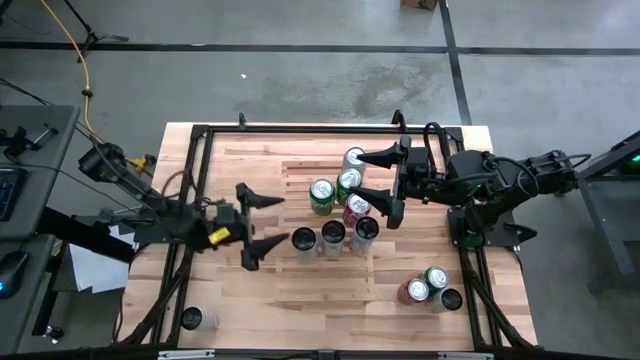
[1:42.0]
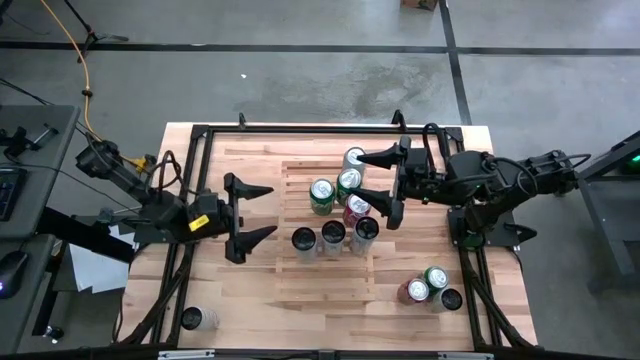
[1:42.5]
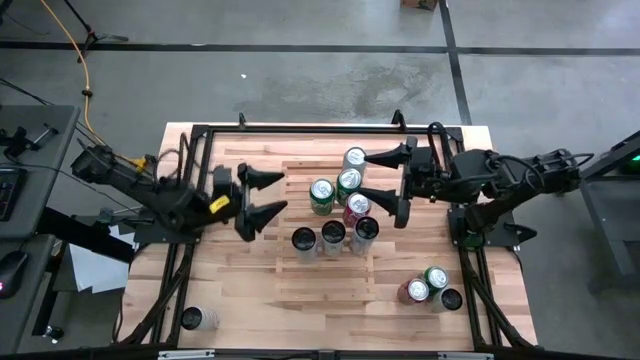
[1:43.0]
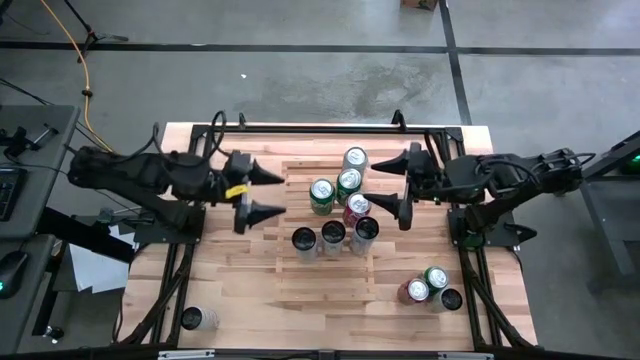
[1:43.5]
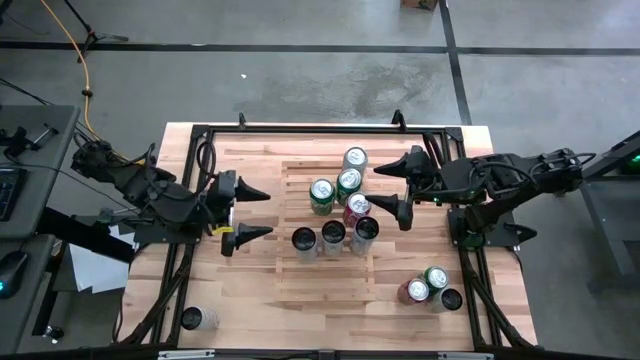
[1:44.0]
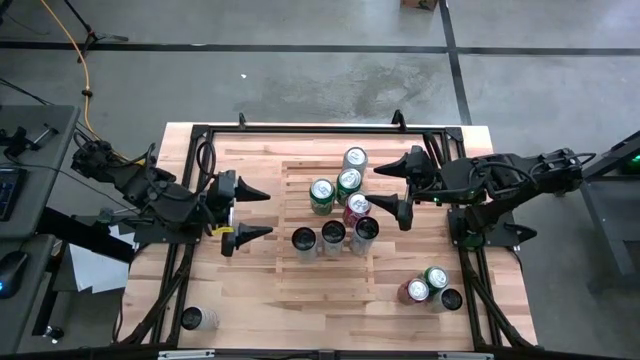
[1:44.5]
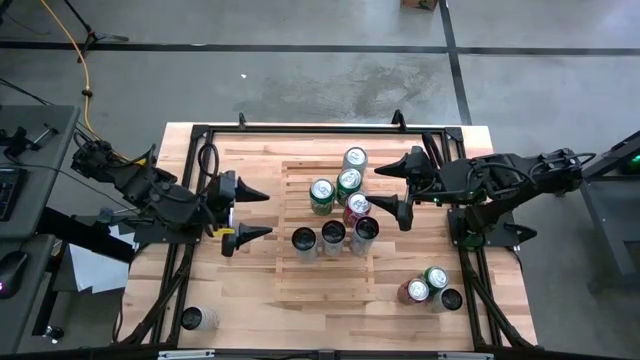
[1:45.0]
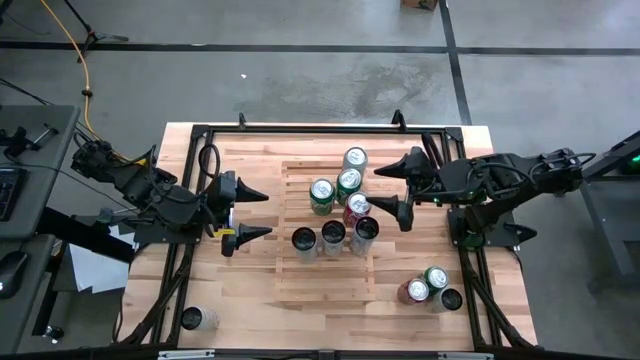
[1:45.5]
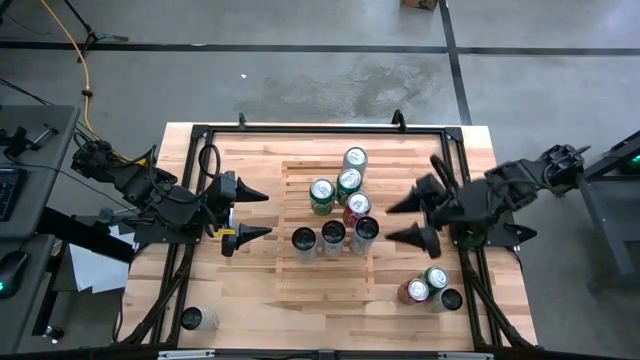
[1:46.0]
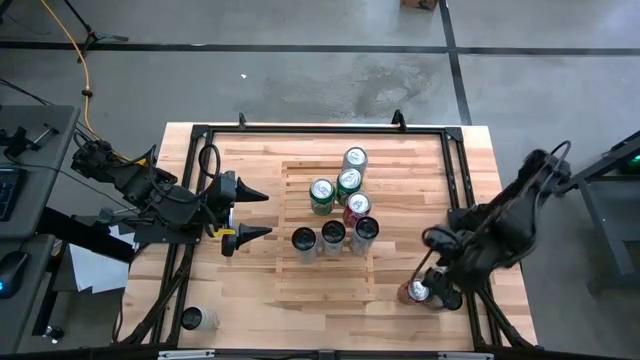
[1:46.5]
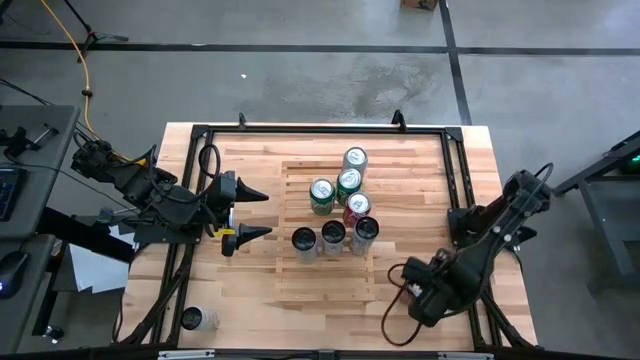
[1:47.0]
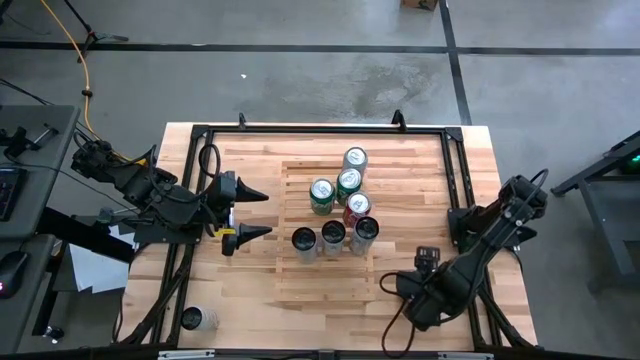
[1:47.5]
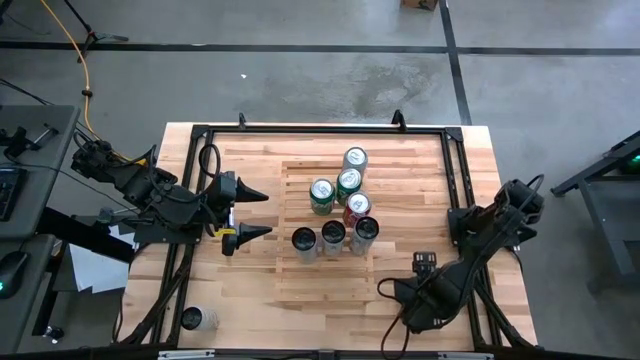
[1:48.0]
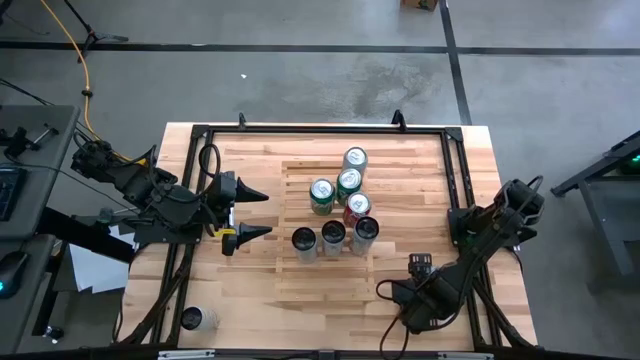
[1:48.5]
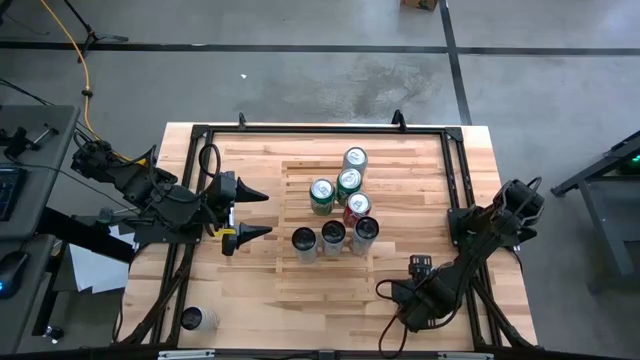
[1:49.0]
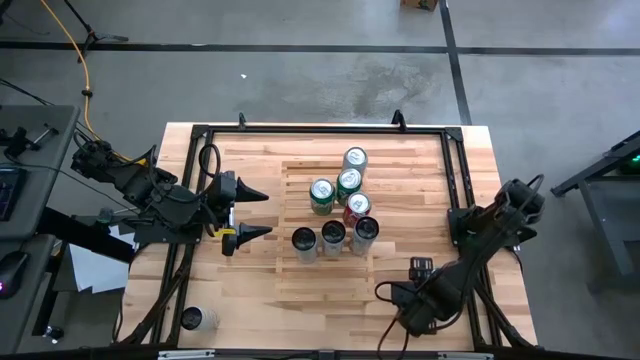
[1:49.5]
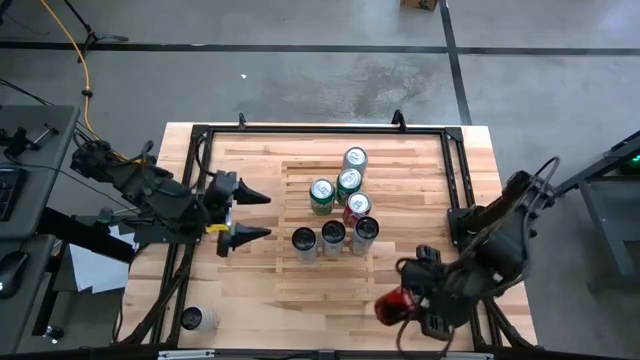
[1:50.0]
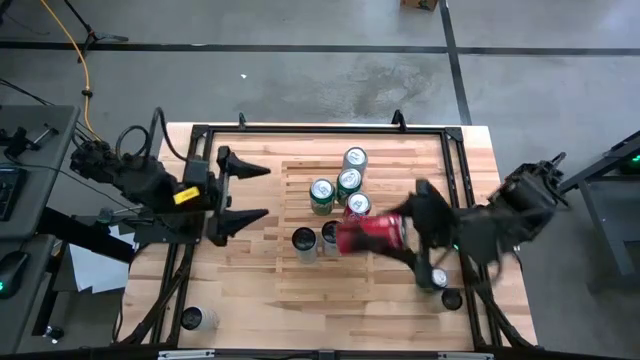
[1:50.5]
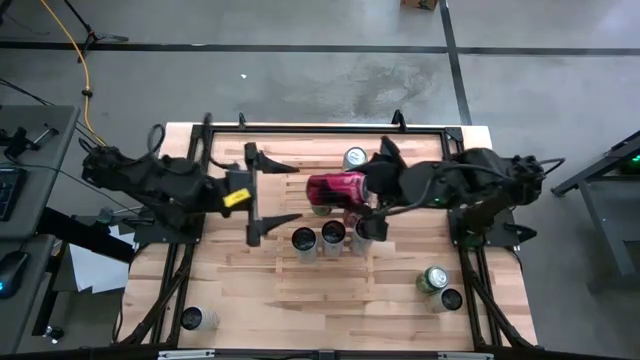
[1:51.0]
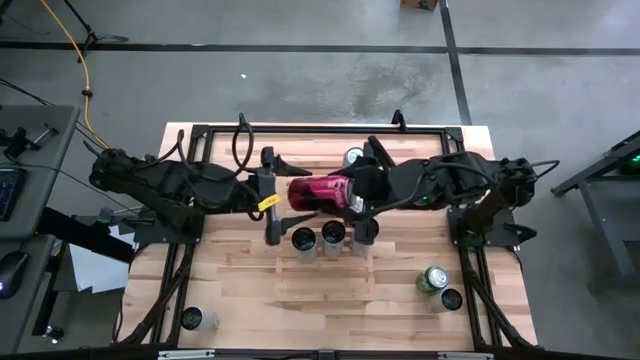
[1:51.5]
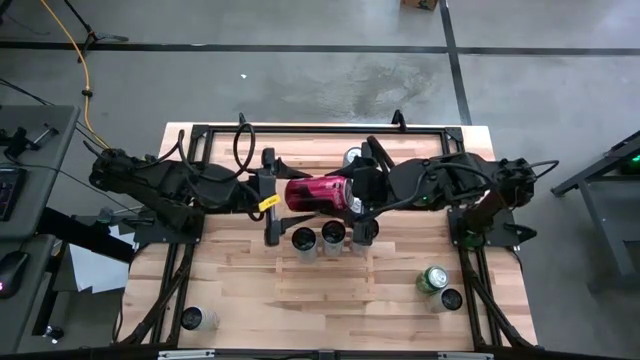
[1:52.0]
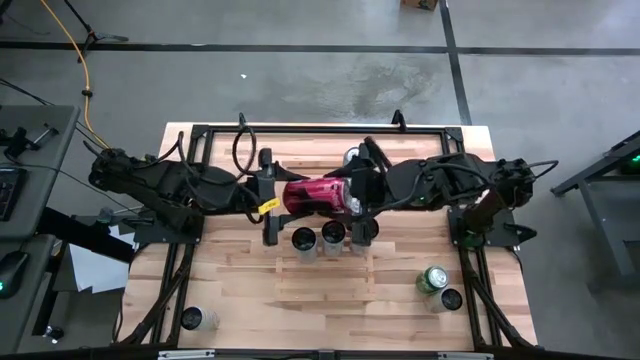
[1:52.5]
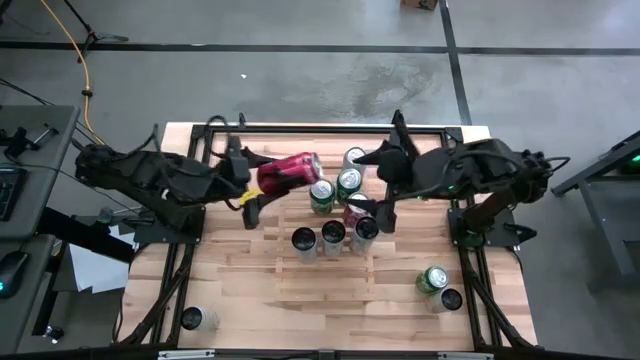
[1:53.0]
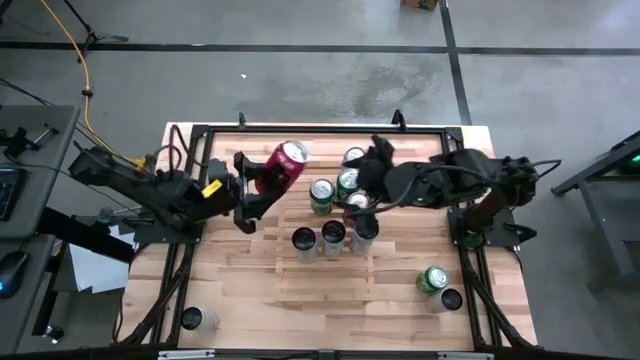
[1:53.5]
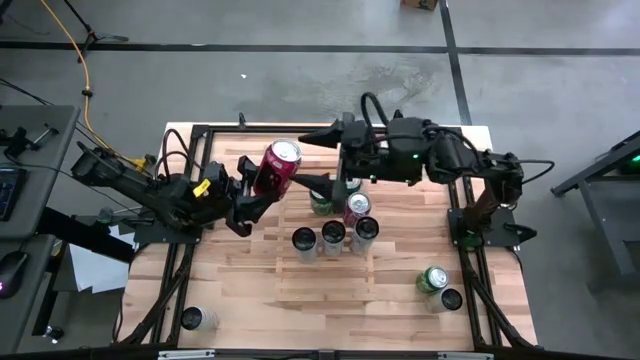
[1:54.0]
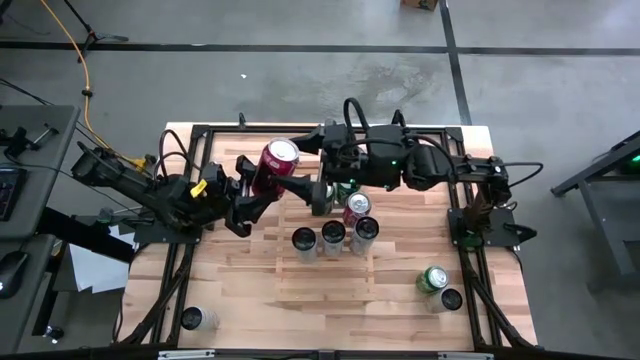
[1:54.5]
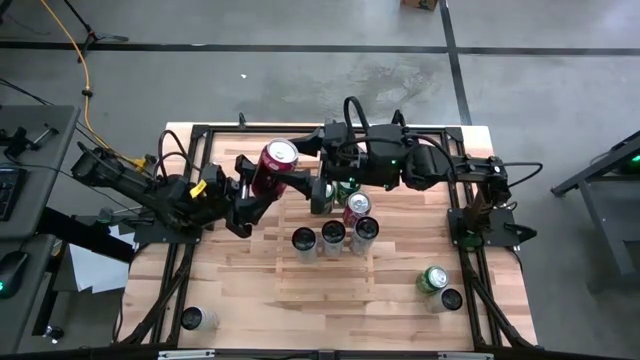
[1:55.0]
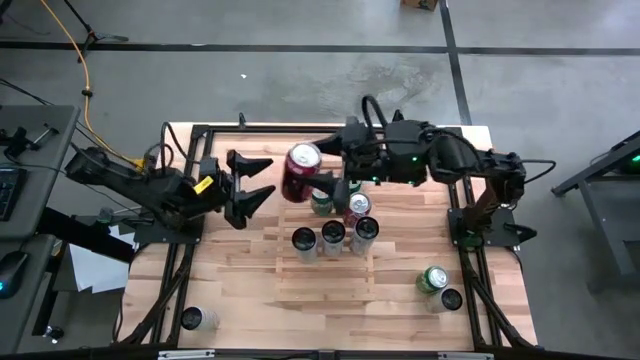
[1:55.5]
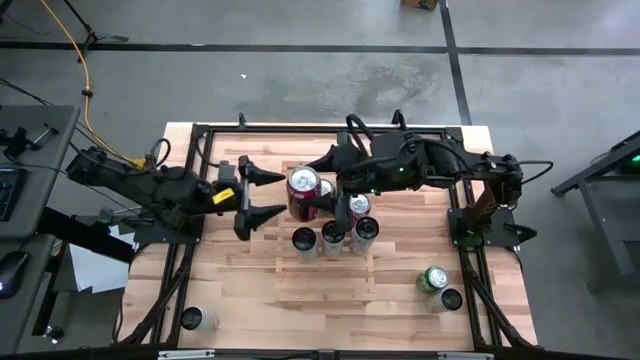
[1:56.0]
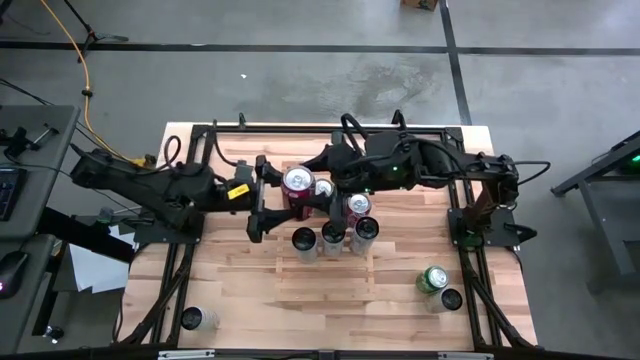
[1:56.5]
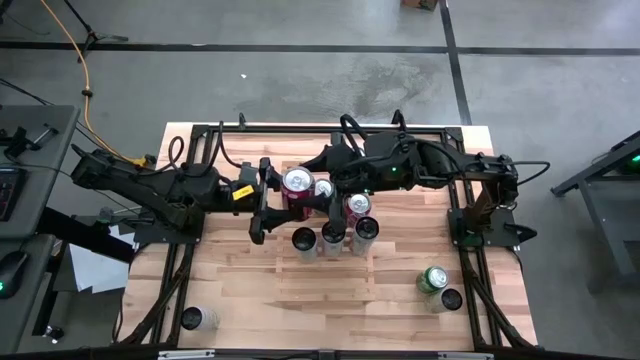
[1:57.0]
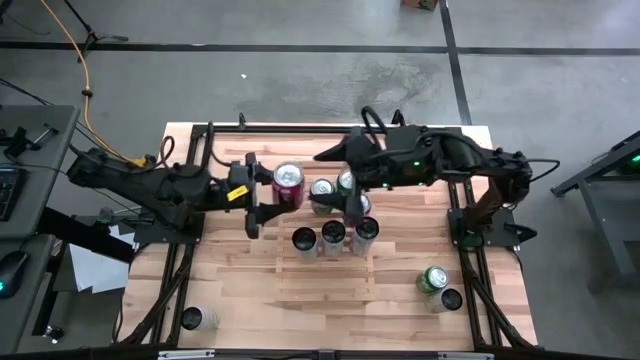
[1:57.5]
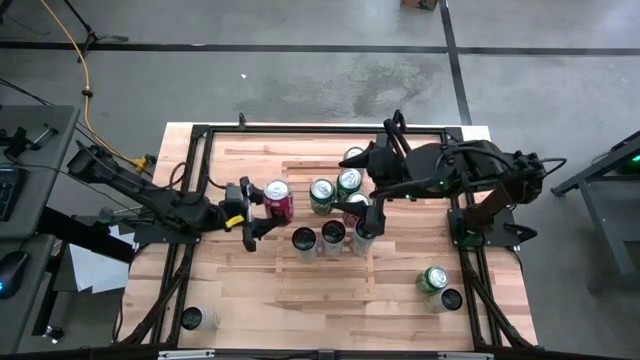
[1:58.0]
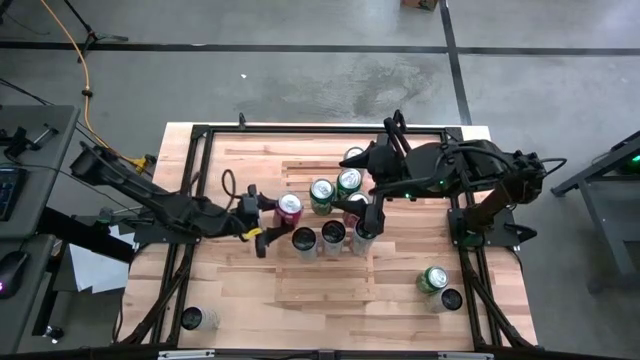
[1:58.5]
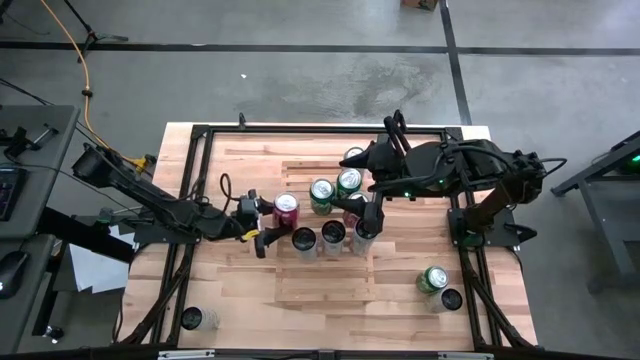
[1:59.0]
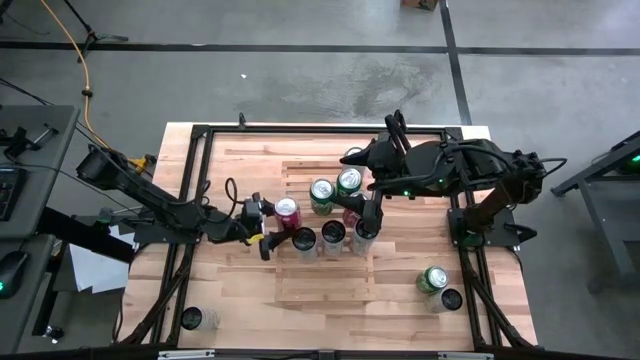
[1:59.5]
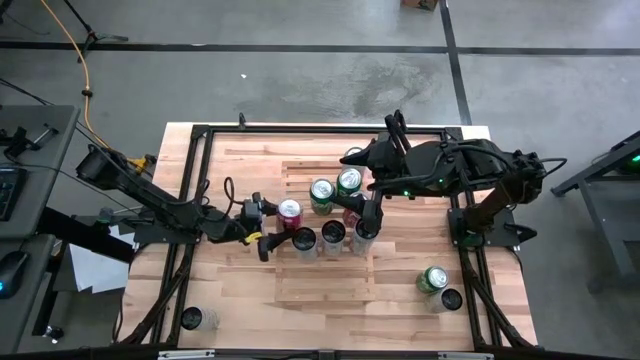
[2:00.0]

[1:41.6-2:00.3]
Task: Place canned beverage on shelf
Put the red soda can on the shelf aligned with the other red soda can

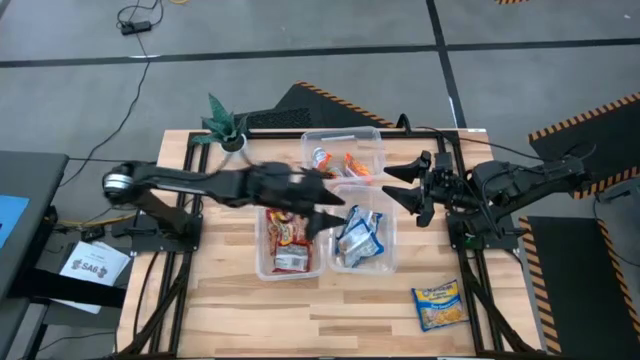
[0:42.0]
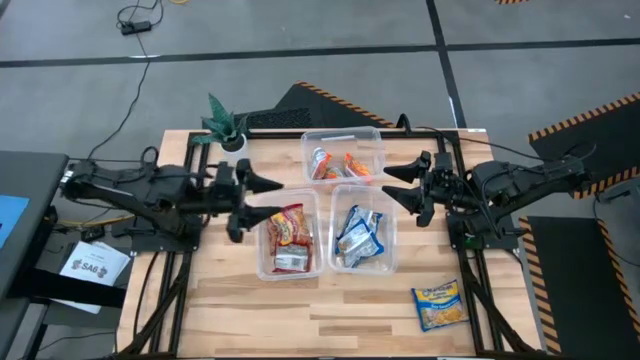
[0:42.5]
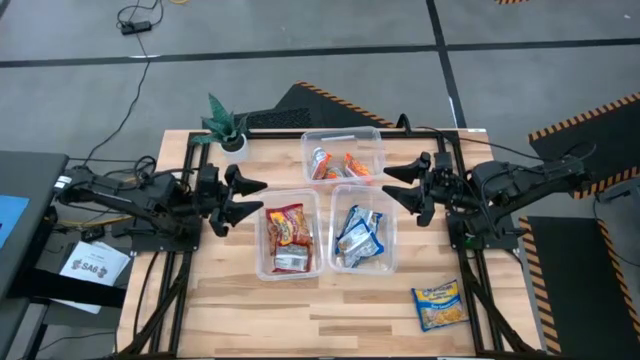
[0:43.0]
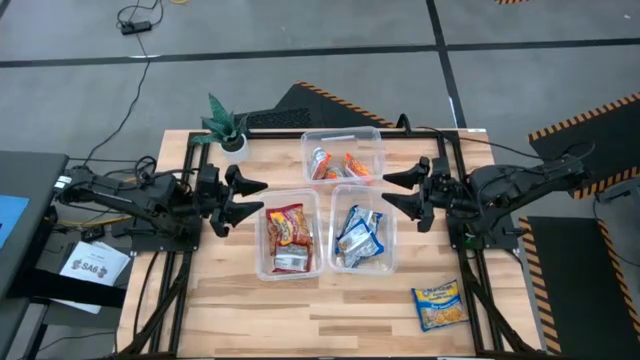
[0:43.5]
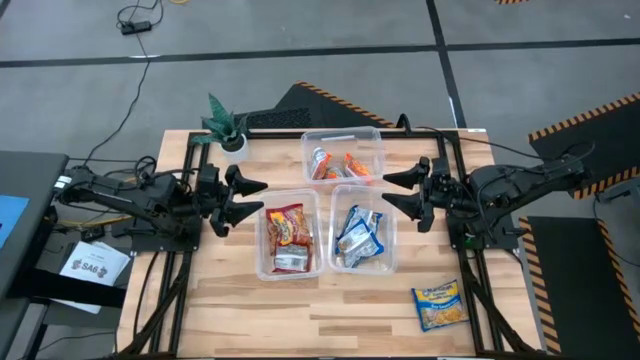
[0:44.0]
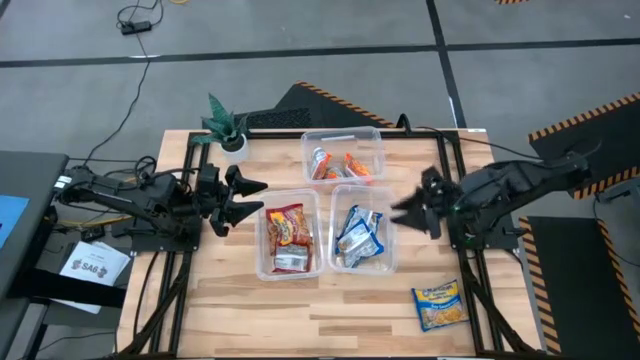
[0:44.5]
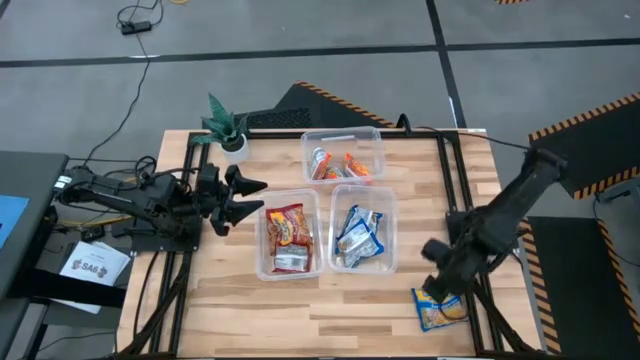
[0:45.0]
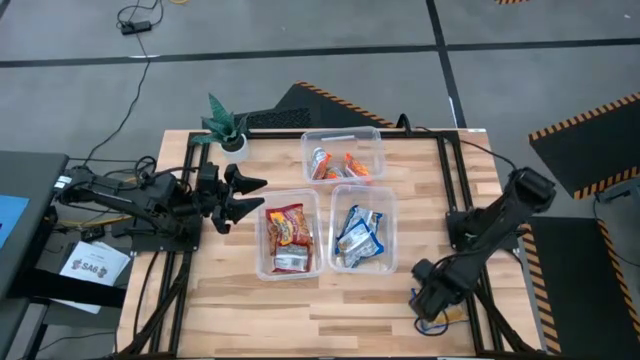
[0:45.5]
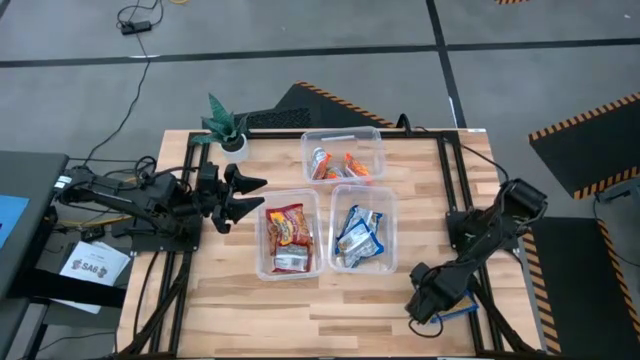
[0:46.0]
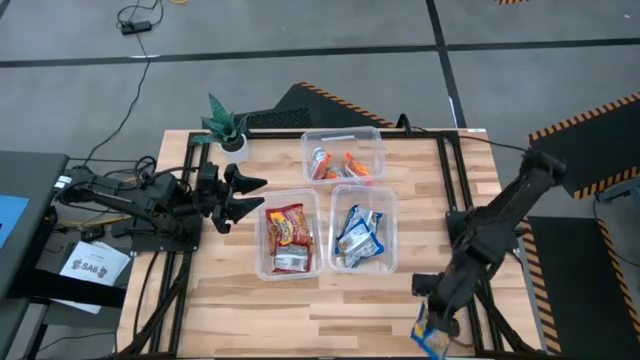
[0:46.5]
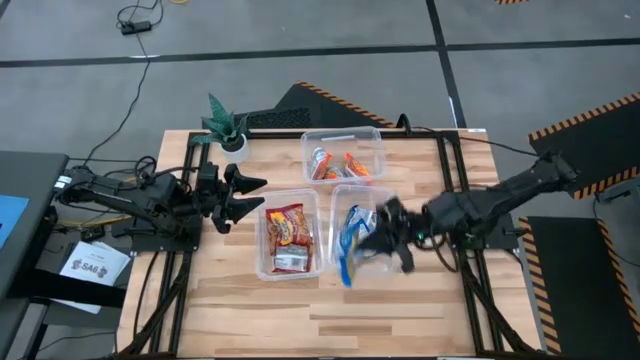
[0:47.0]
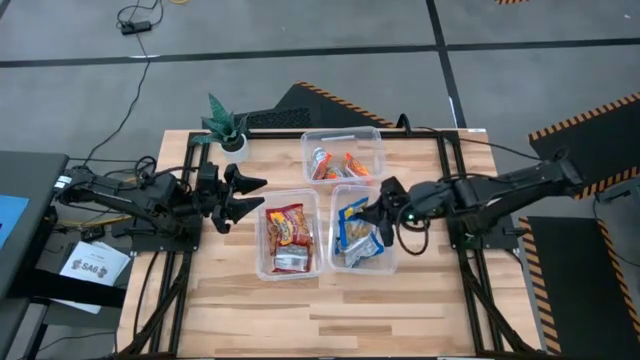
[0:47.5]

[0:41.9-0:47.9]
Task: Sort Maruchan noodles
Put the blue noodle pack into the bottom right transparent bin
